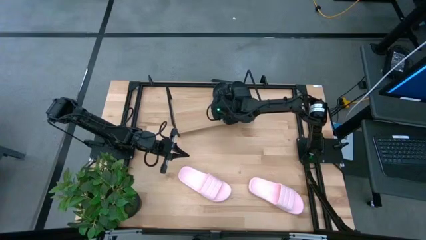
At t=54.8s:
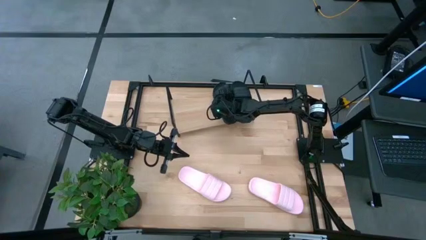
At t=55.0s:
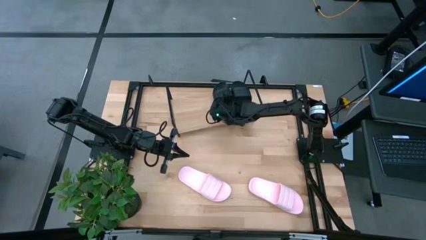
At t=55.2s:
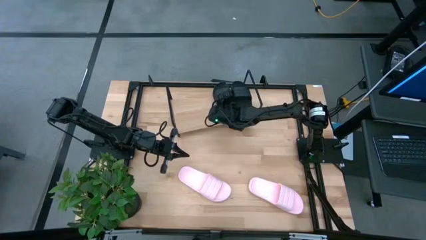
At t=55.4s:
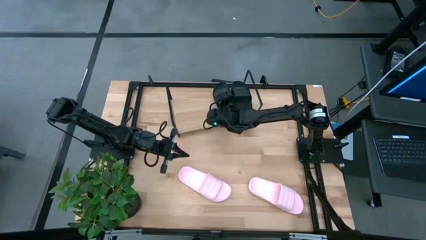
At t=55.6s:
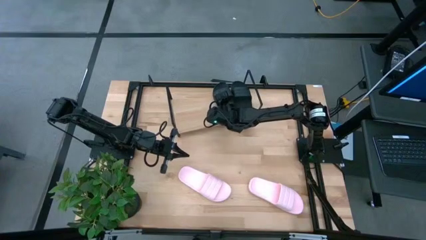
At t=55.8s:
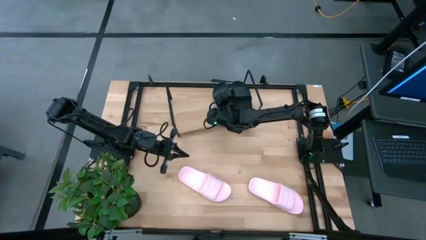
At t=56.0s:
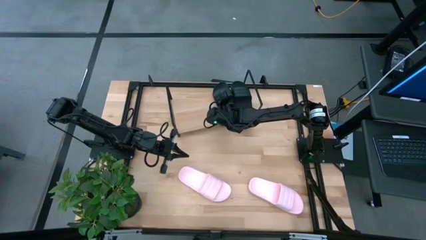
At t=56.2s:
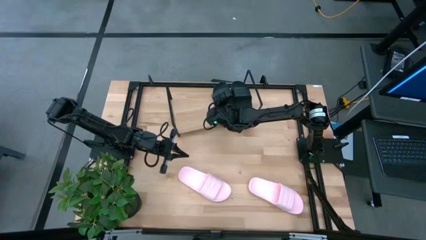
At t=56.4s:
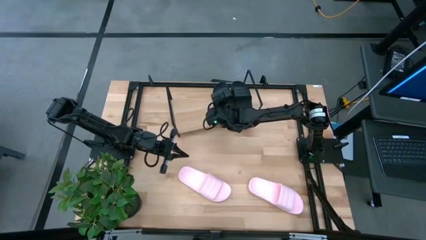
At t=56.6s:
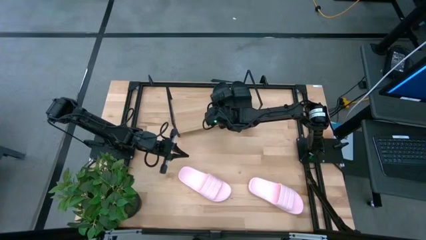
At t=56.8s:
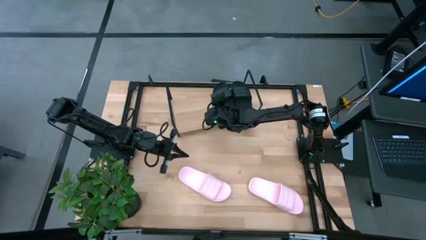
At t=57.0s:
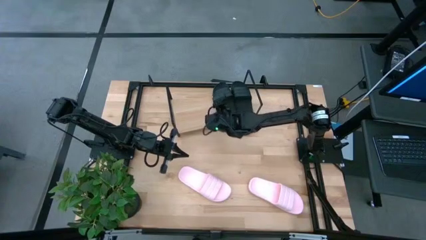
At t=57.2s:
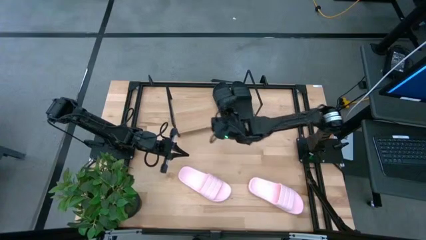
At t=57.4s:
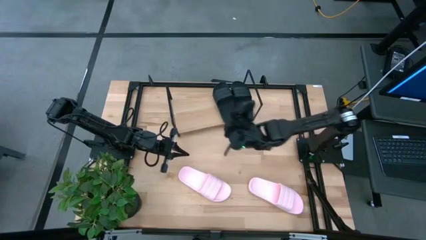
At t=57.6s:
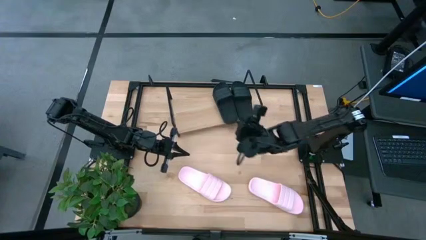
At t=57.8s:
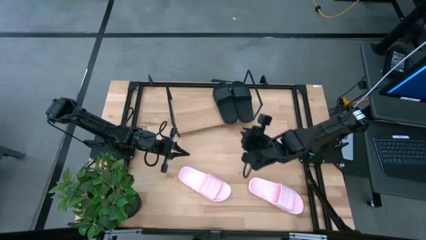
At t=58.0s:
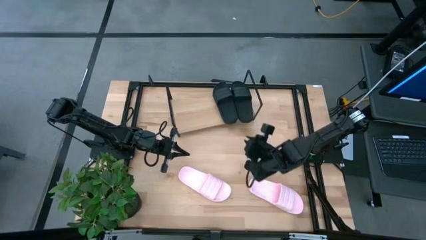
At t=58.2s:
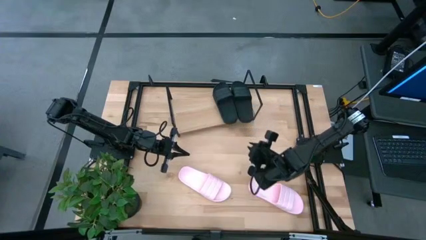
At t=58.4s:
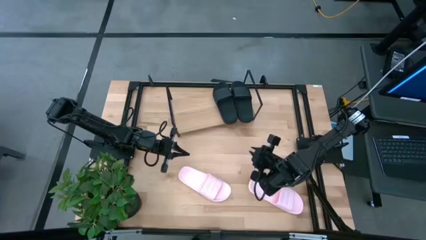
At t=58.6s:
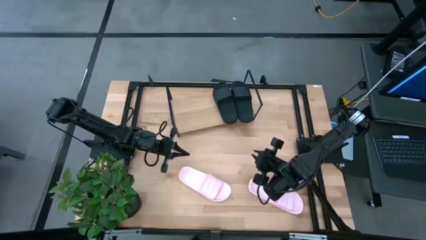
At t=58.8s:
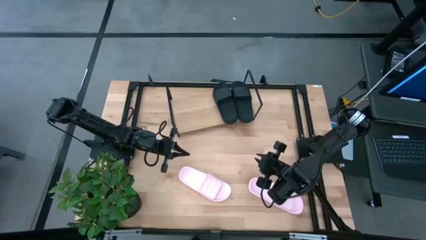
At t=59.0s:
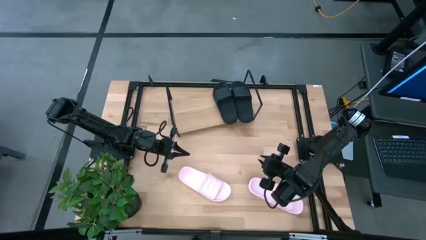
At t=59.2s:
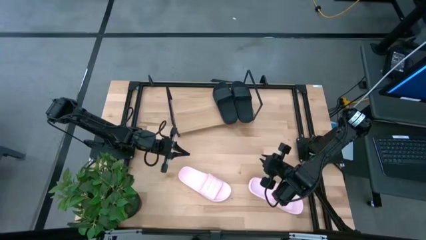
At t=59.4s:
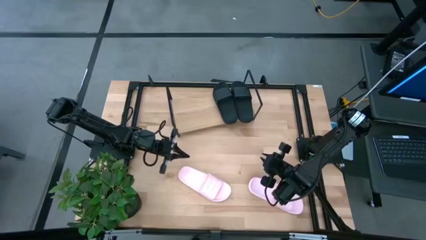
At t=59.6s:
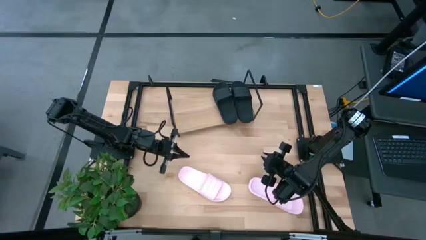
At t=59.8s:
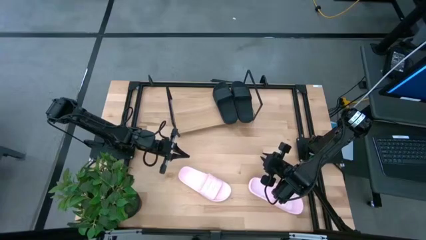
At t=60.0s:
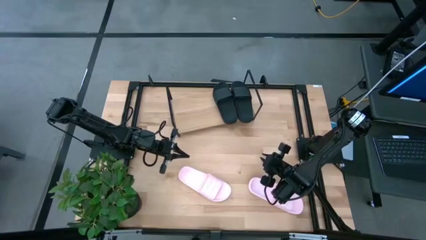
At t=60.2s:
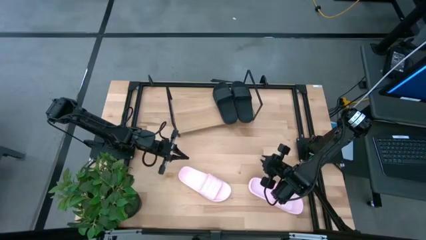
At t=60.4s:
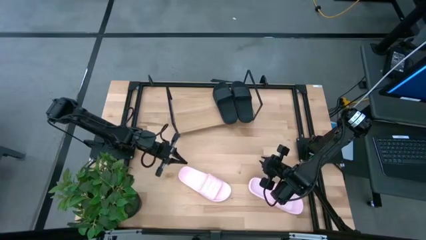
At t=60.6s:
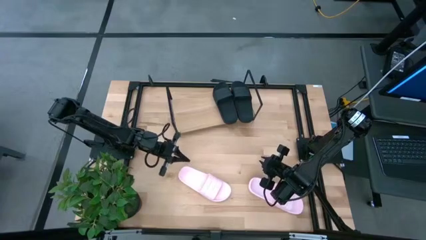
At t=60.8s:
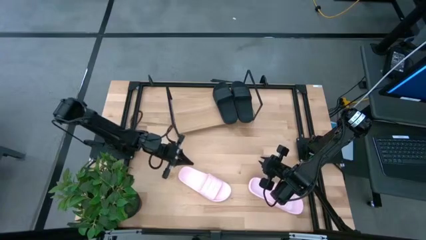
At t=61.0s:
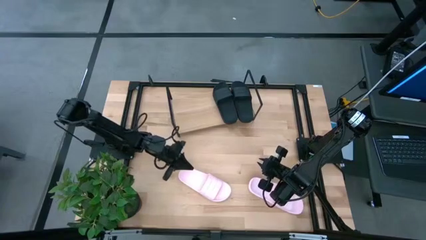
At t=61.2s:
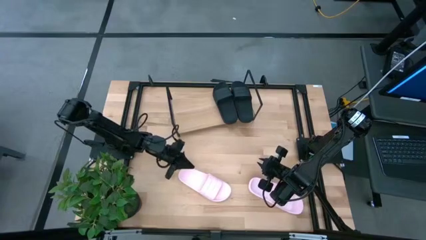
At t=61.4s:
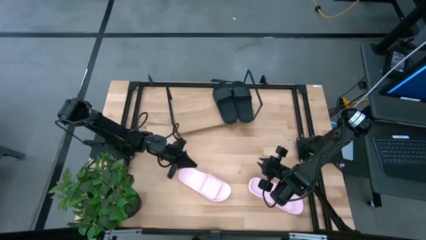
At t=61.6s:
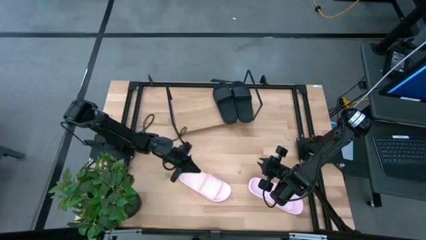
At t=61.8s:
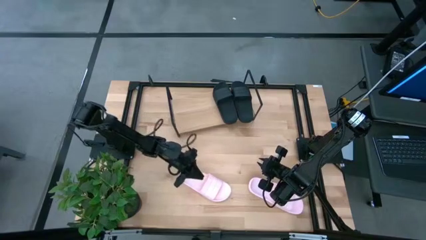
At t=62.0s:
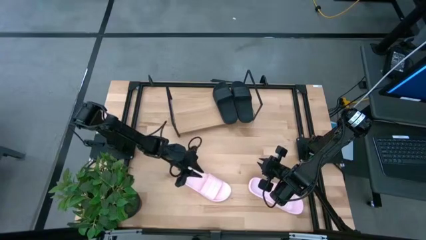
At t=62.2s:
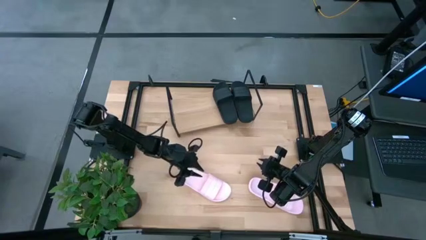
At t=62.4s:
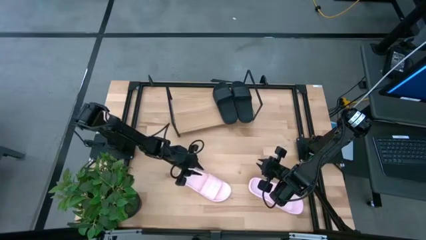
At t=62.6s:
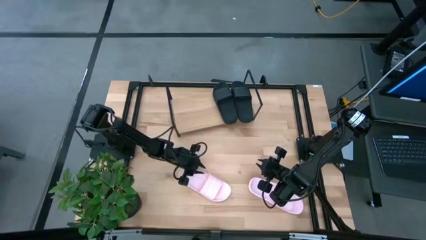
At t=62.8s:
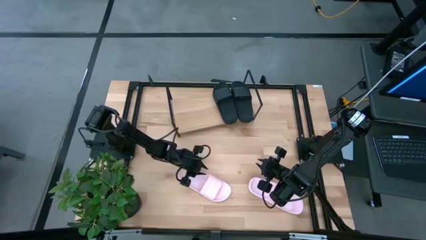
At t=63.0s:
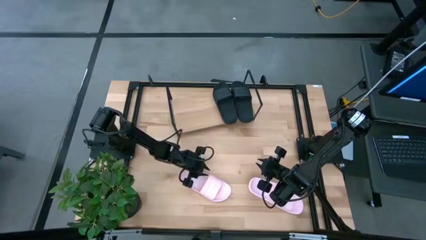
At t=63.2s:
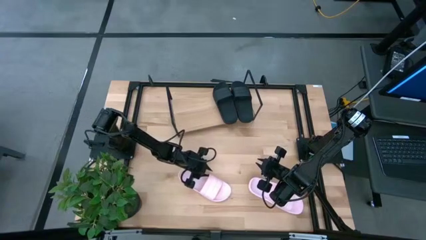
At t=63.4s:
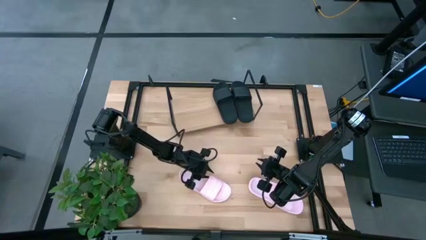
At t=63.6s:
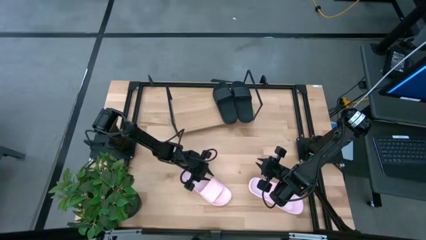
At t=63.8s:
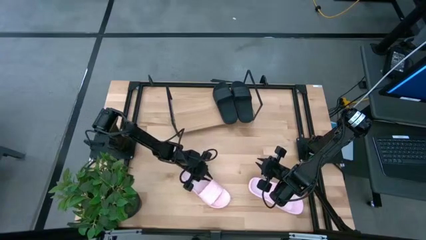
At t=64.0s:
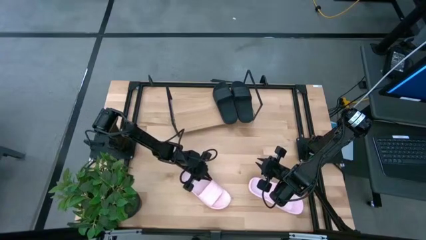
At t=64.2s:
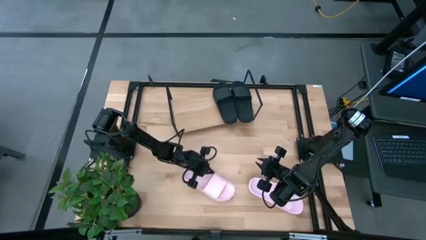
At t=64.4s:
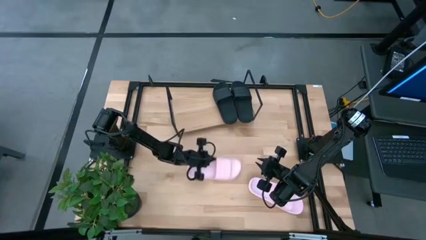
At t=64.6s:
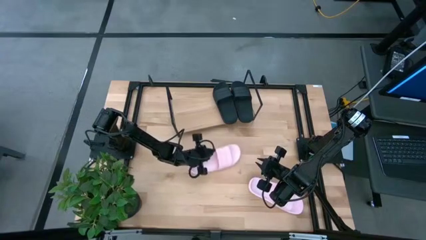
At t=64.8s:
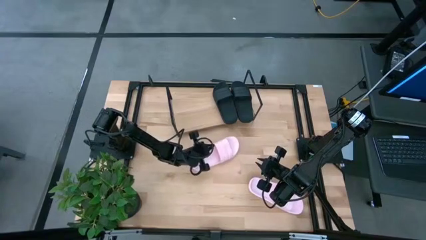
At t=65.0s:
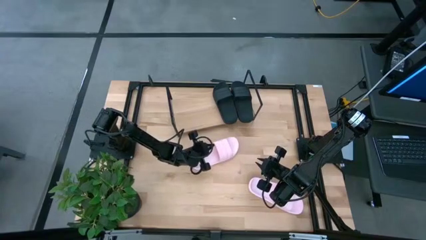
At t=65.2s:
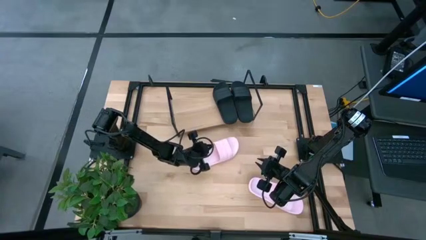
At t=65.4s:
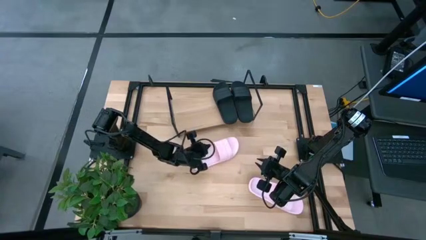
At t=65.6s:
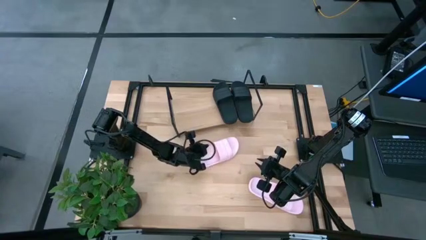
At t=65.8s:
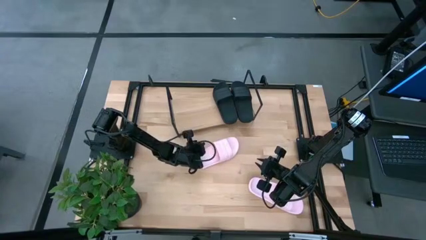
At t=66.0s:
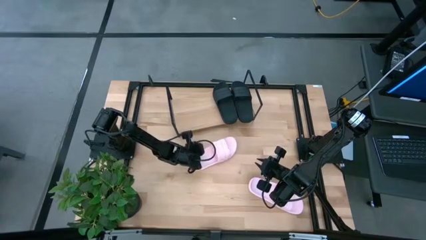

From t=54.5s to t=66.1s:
Task: Pick and place slides into the shelf
Put the left pink slipper on the shelf
